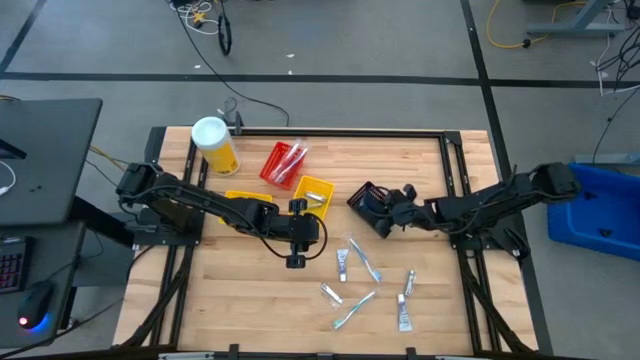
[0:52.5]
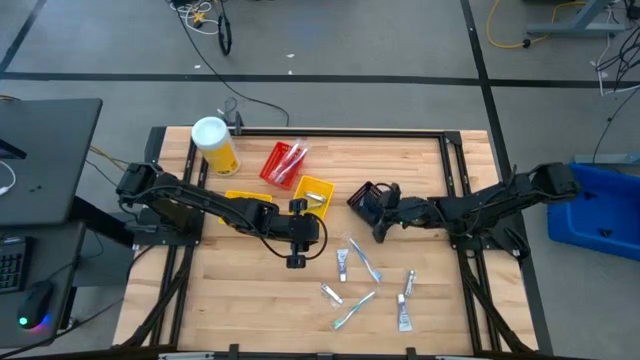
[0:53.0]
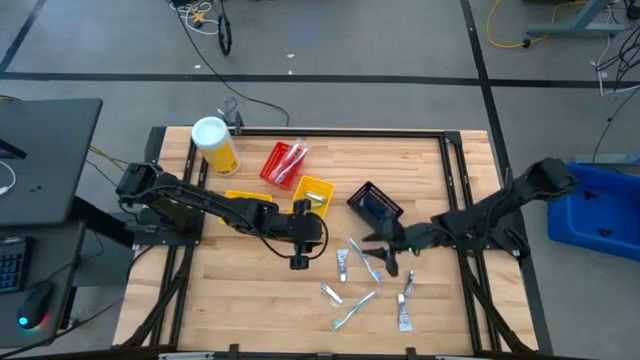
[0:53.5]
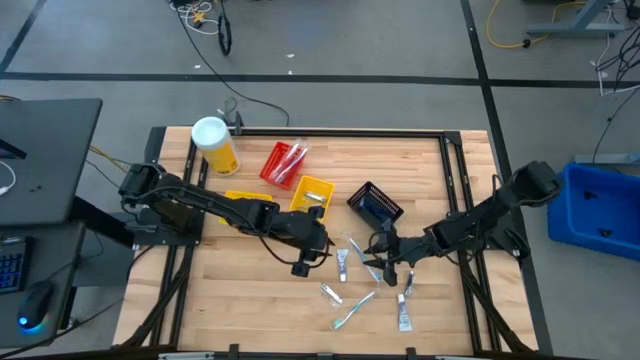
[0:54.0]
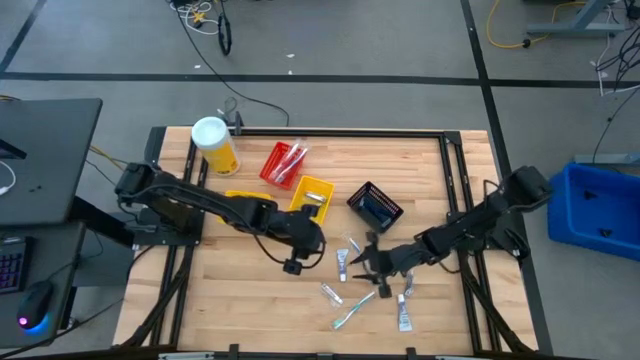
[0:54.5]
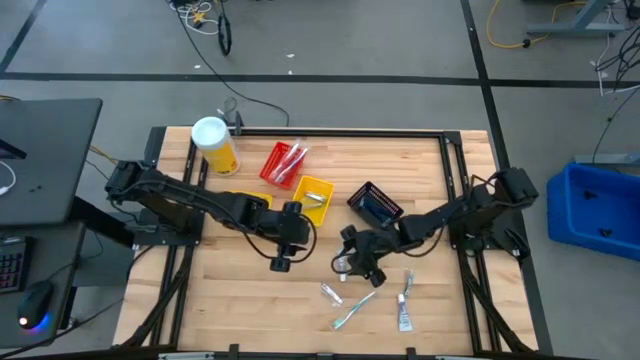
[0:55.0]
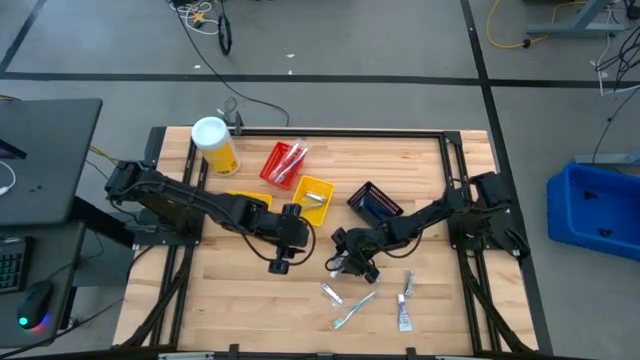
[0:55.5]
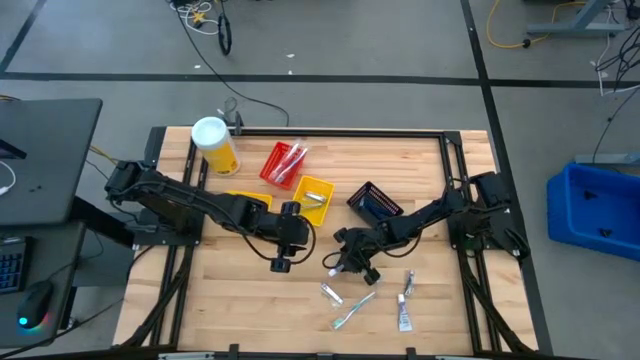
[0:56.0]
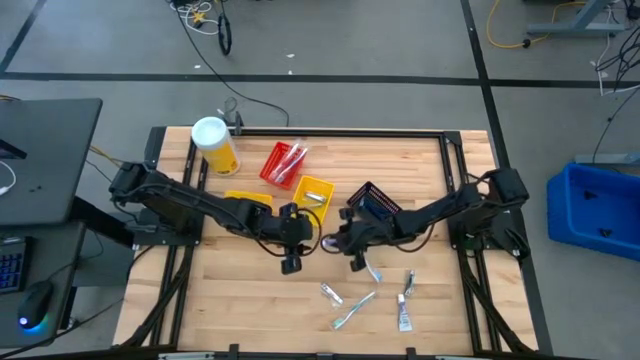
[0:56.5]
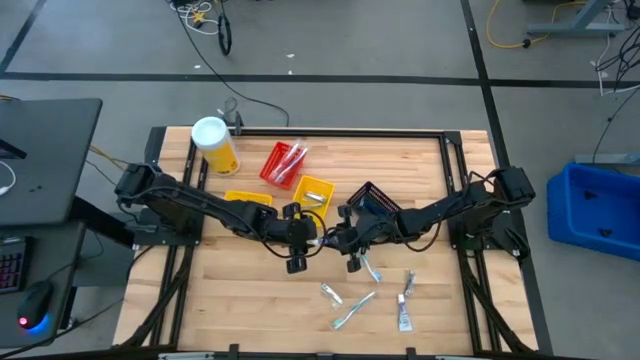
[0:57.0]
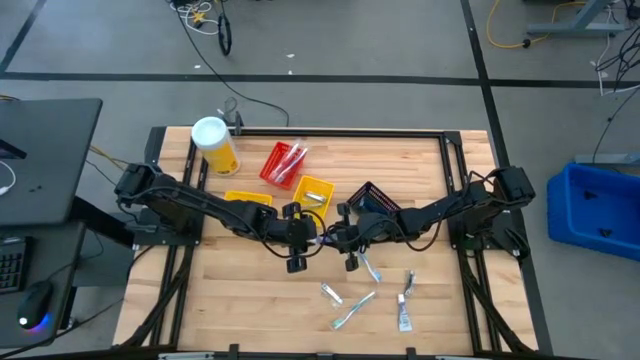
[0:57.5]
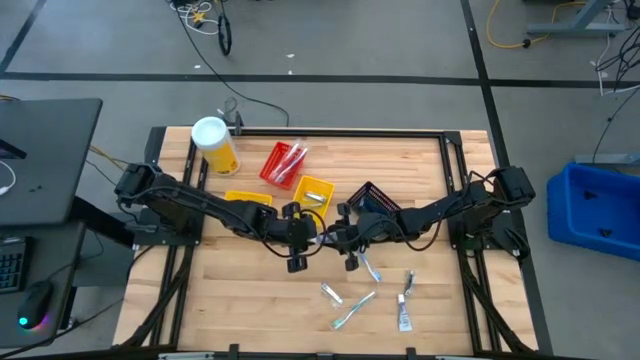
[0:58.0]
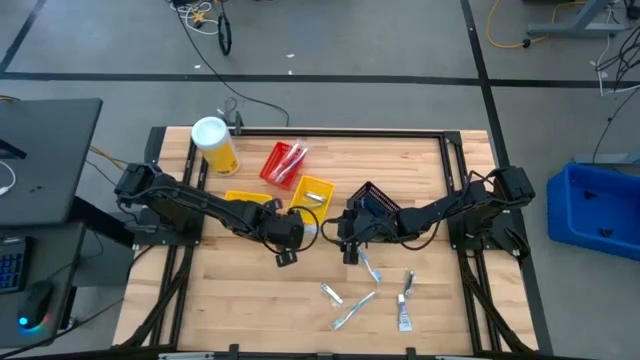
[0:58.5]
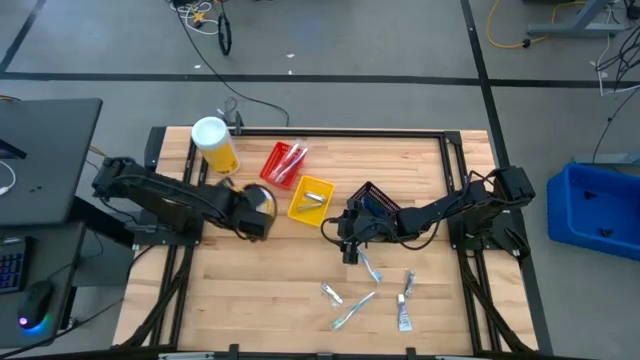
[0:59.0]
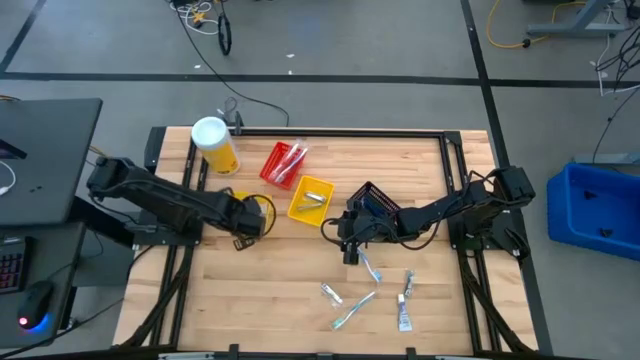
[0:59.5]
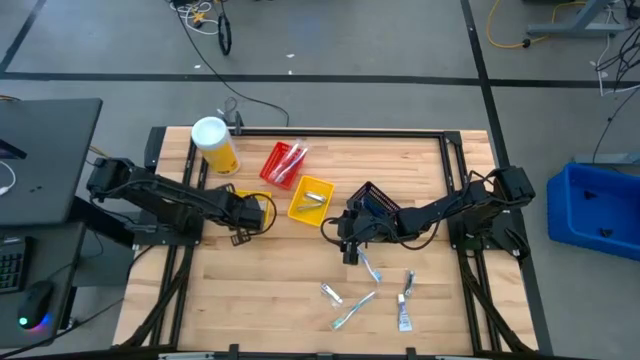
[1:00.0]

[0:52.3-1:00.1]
Task: Pick & Place Travel size toiletries
Put the white toothpaste into the left yellow bin

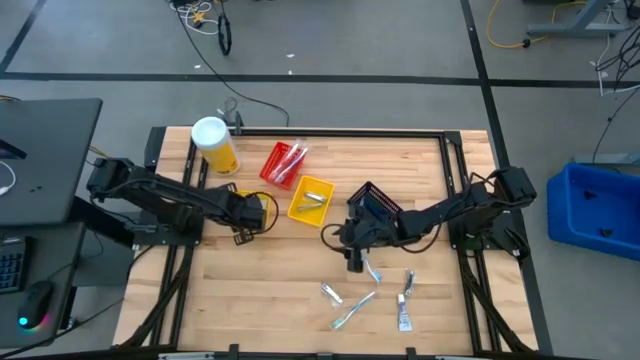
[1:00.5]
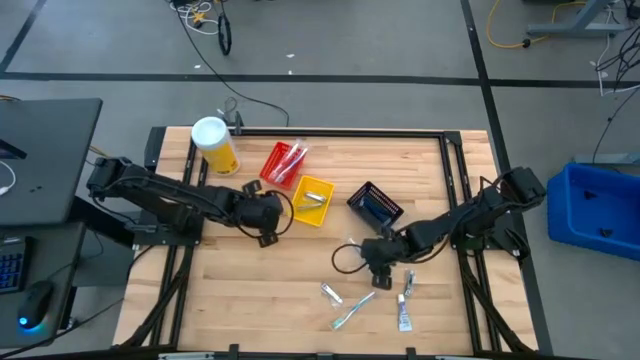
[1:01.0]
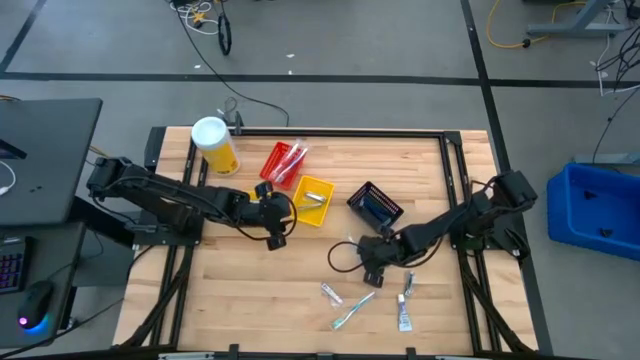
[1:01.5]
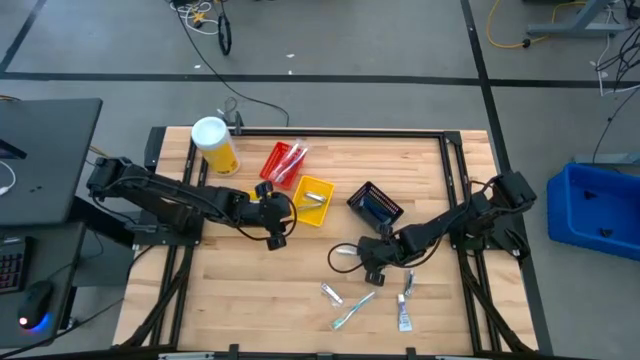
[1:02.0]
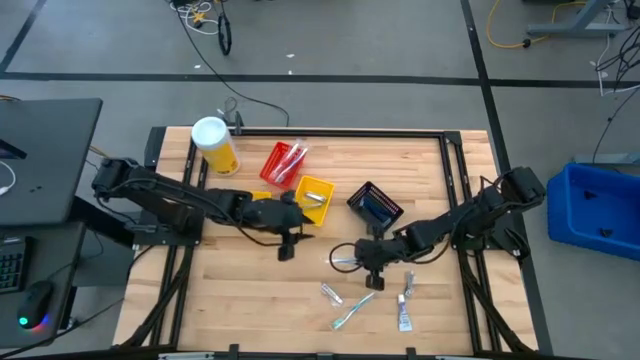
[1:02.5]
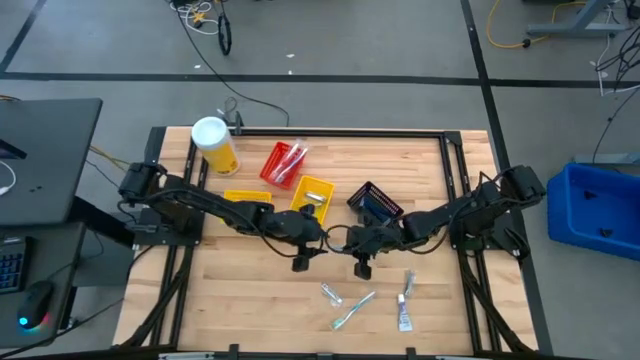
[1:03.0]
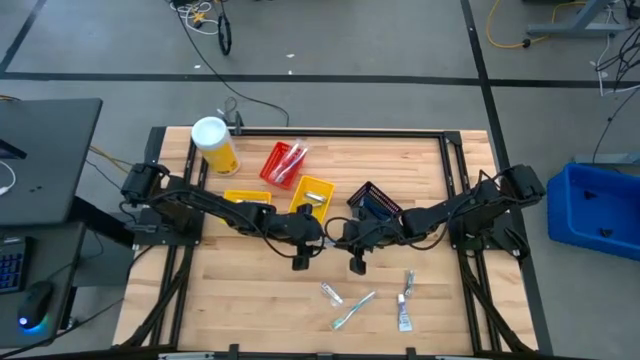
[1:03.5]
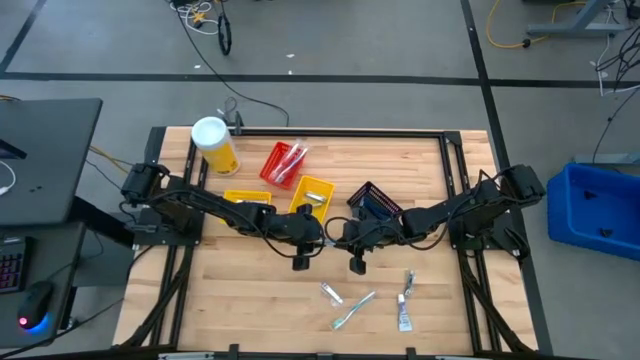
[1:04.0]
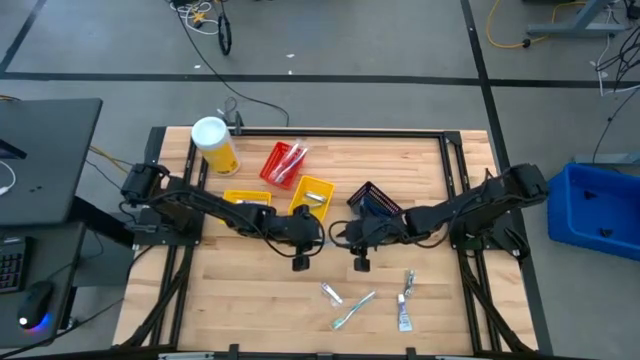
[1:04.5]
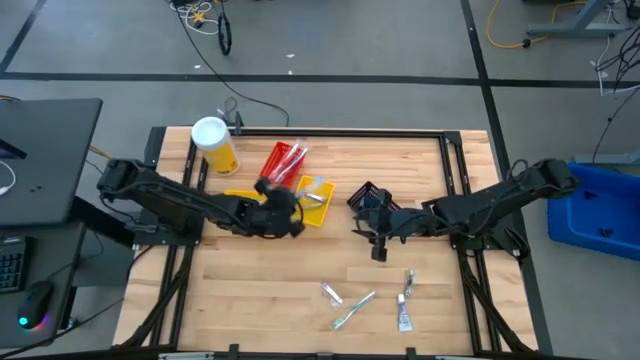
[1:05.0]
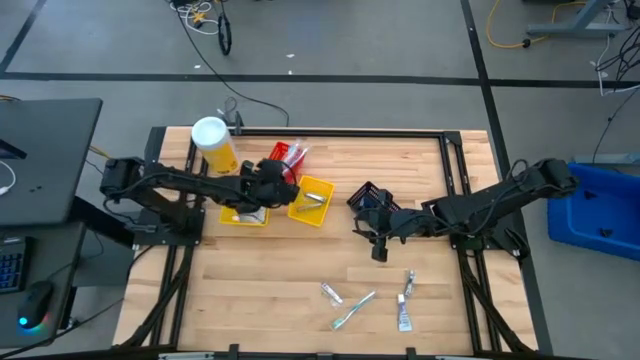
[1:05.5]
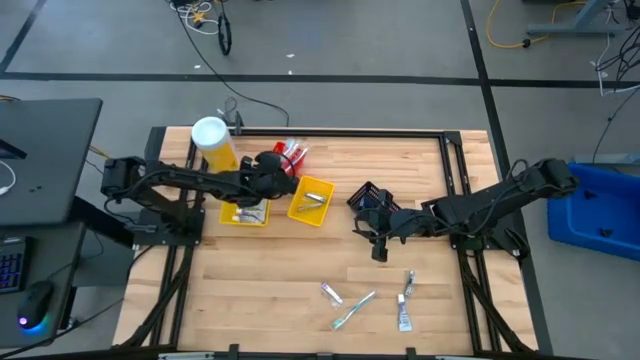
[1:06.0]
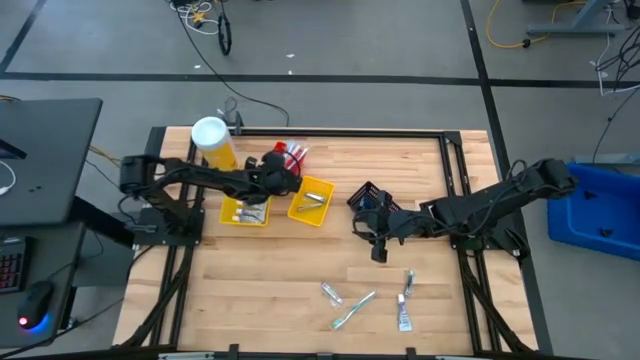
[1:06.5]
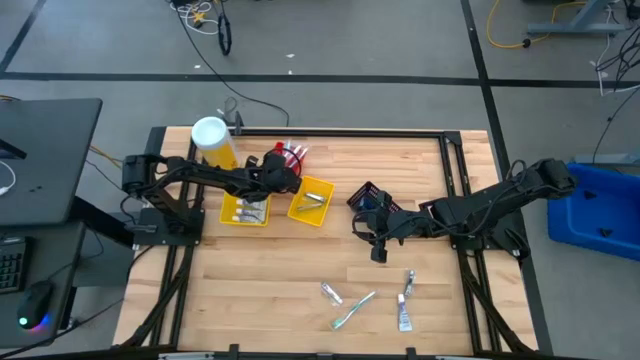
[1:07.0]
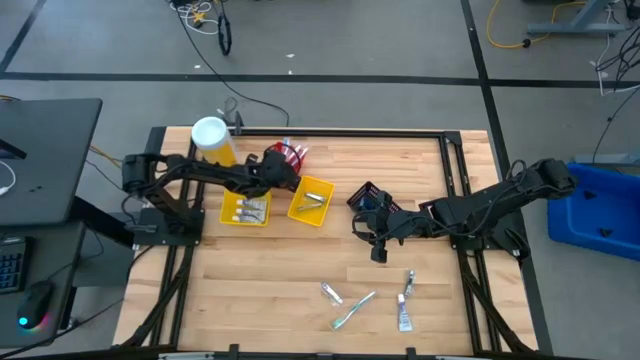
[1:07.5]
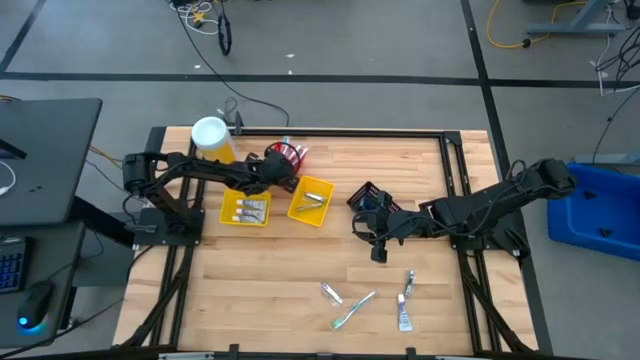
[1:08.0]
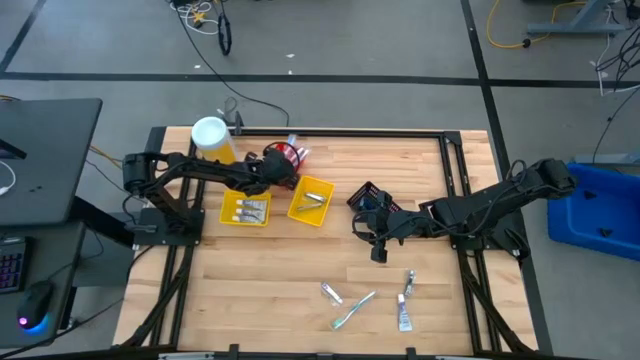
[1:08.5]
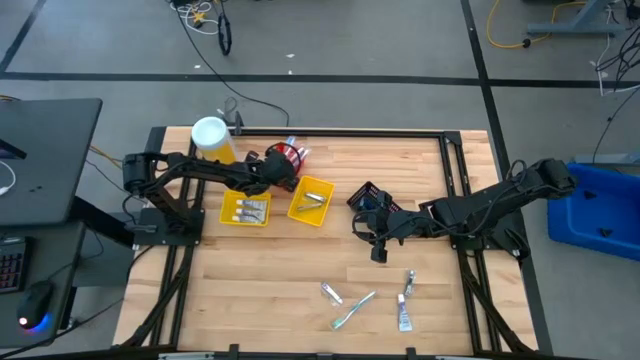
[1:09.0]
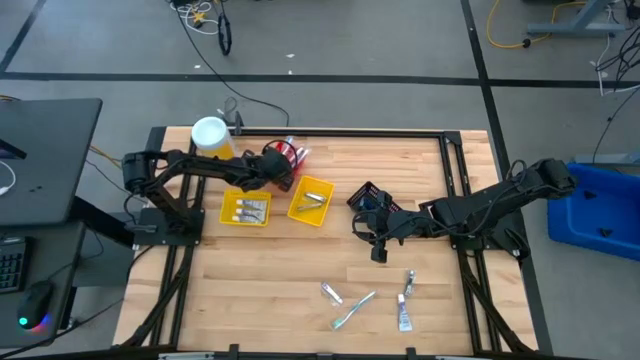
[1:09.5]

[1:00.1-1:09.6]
Put the blue toothbrush into the red bin

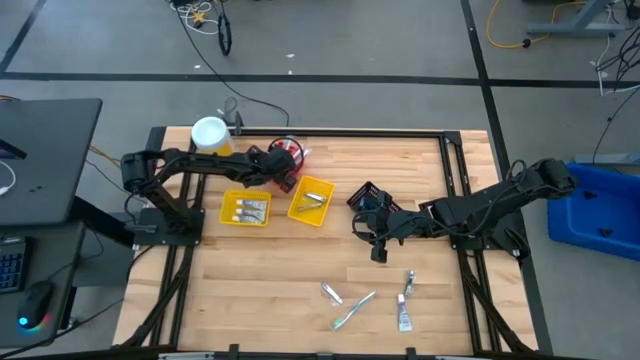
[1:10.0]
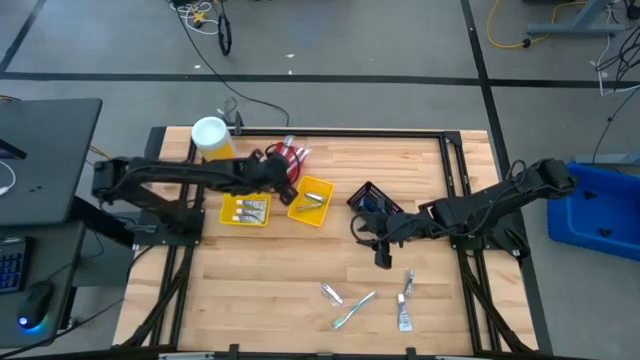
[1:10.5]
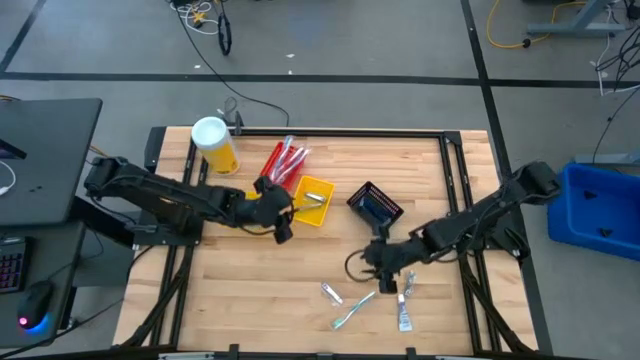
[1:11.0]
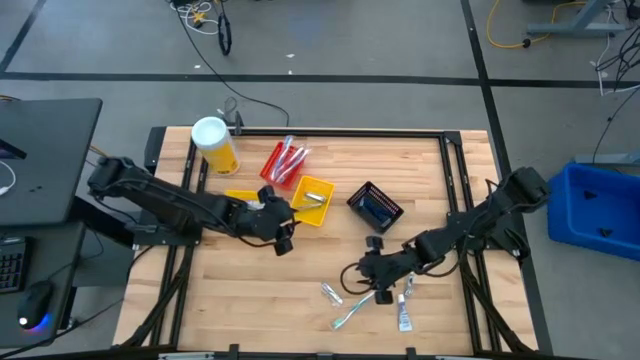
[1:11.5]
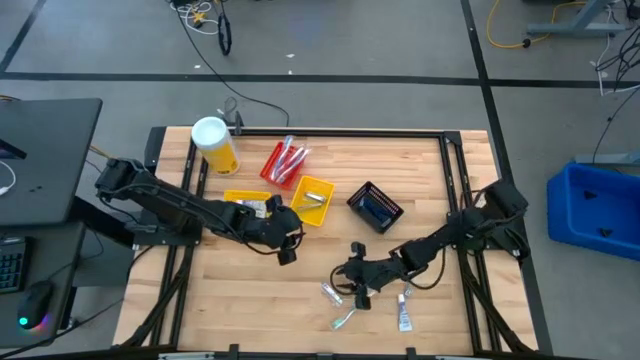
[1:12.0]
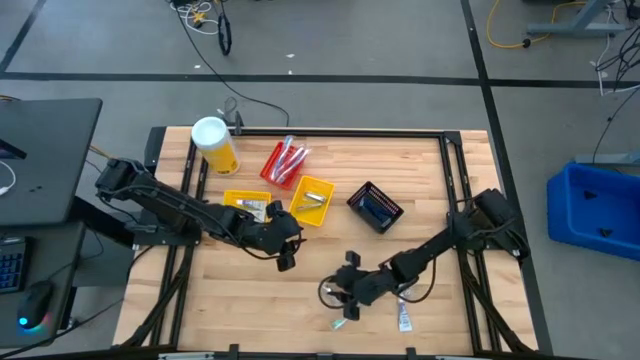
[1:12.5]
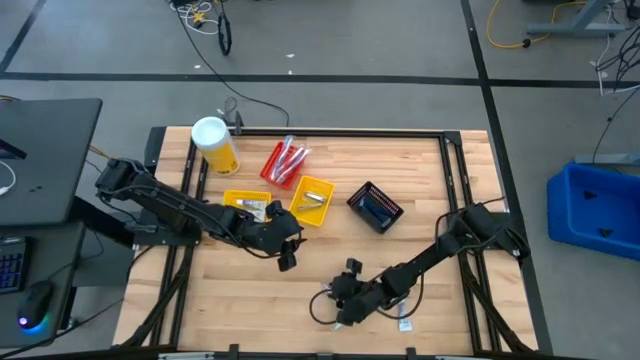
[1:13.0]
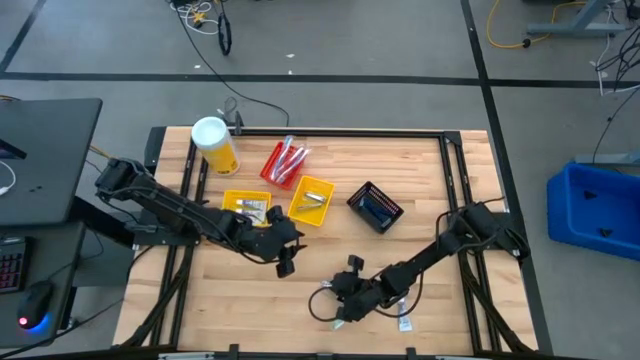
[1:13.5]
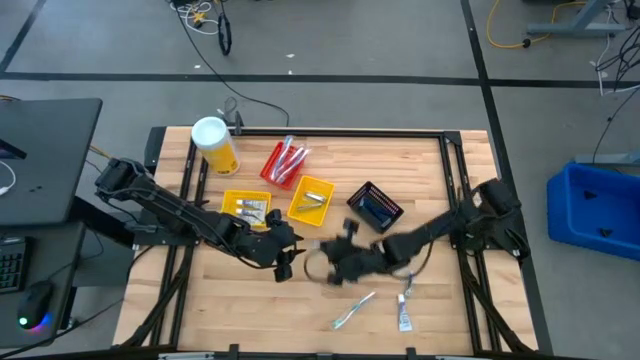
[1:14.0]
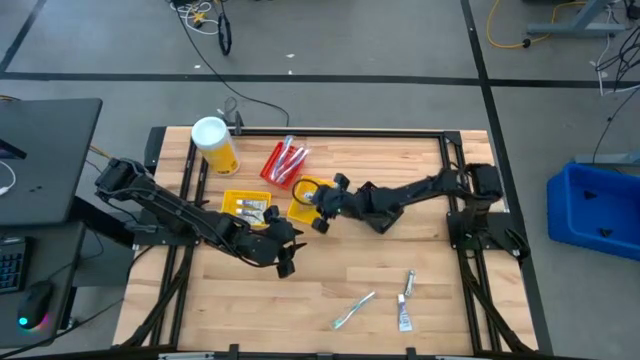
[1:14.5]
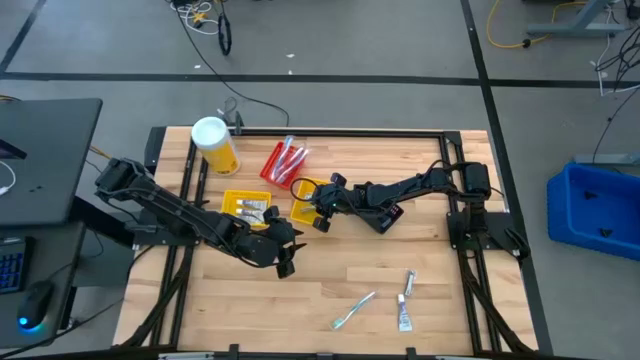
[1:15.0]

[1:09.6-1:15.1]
Put the silver nail cutter into the right yellow bin
